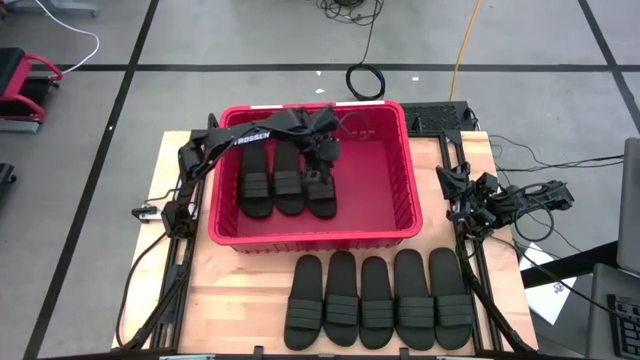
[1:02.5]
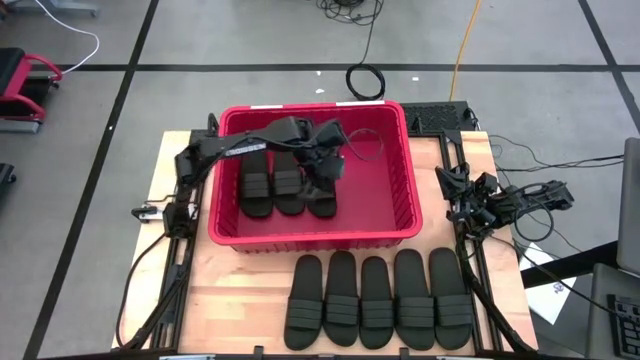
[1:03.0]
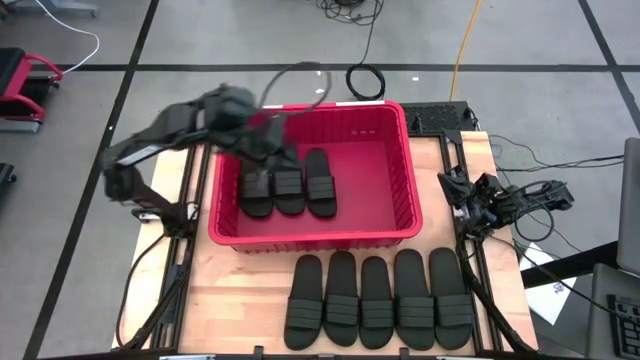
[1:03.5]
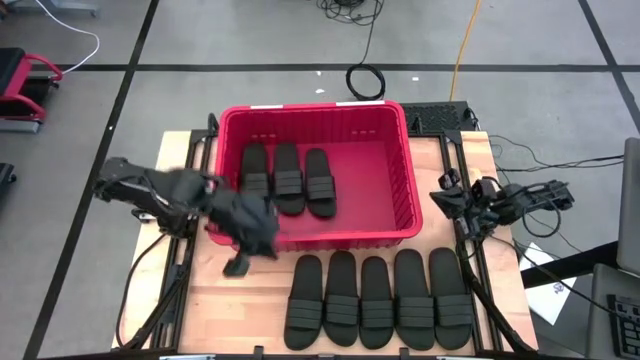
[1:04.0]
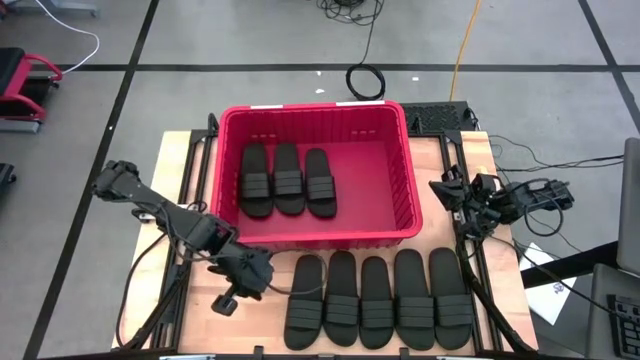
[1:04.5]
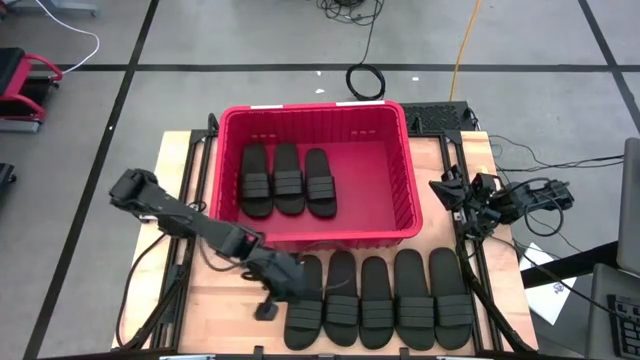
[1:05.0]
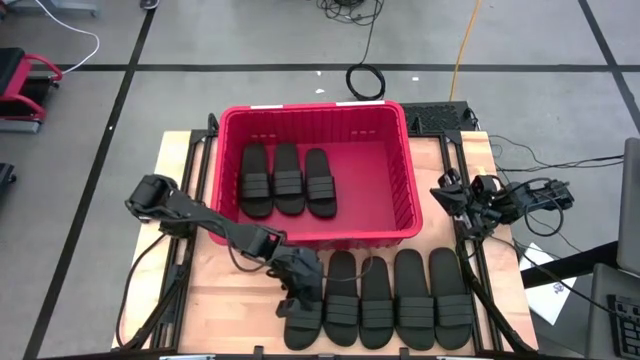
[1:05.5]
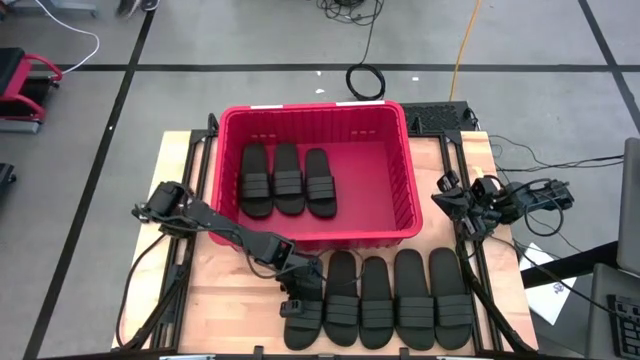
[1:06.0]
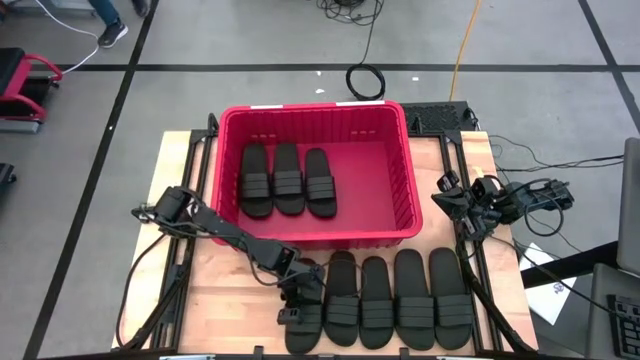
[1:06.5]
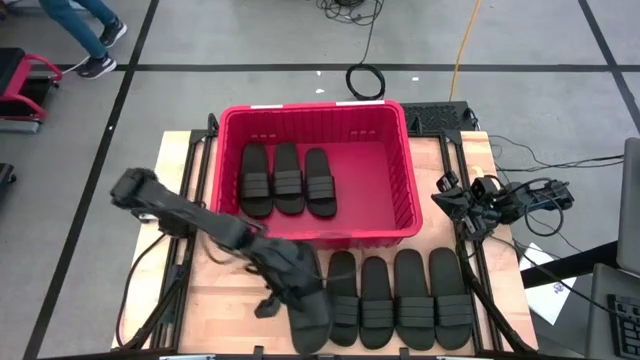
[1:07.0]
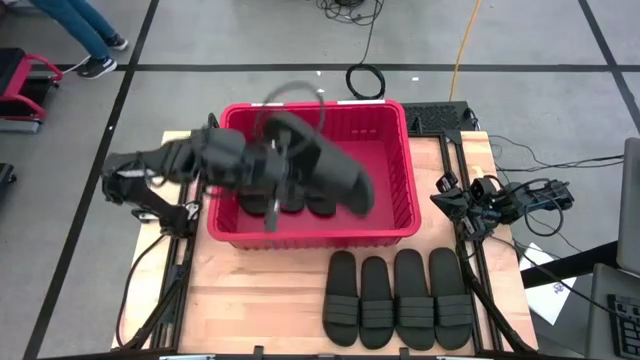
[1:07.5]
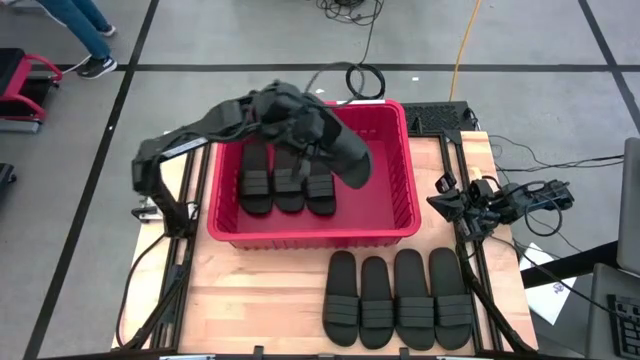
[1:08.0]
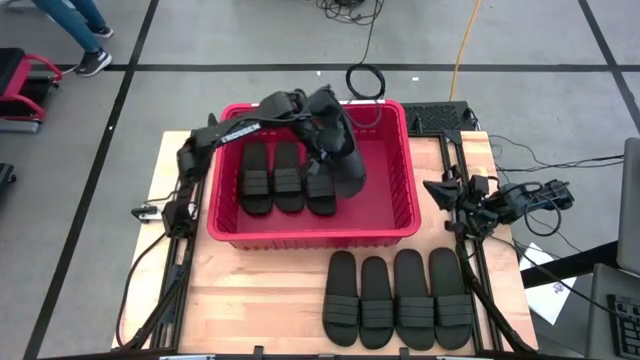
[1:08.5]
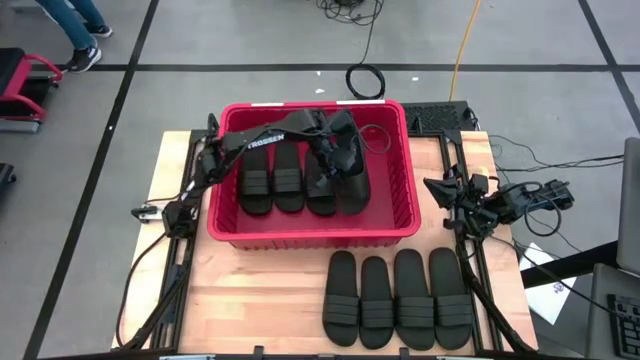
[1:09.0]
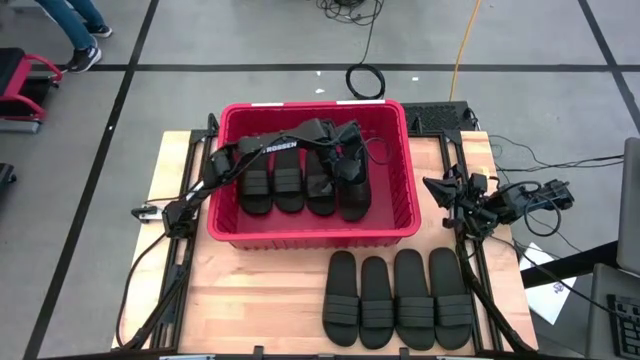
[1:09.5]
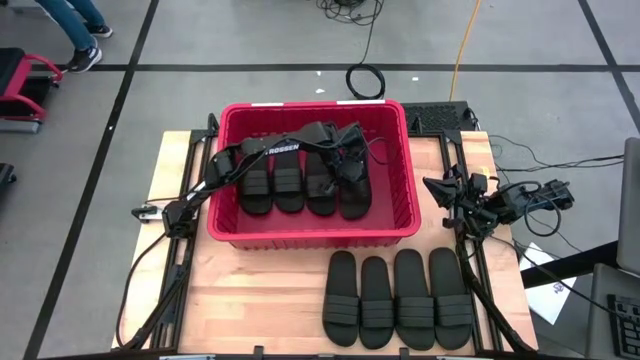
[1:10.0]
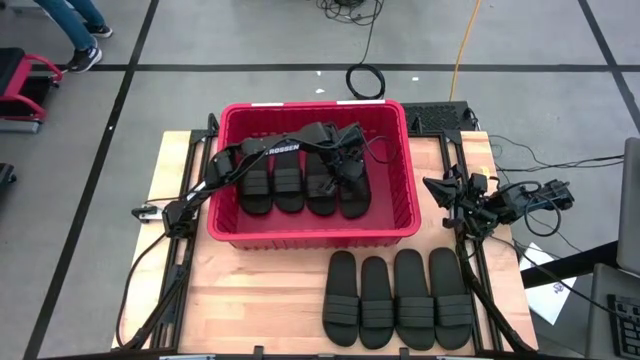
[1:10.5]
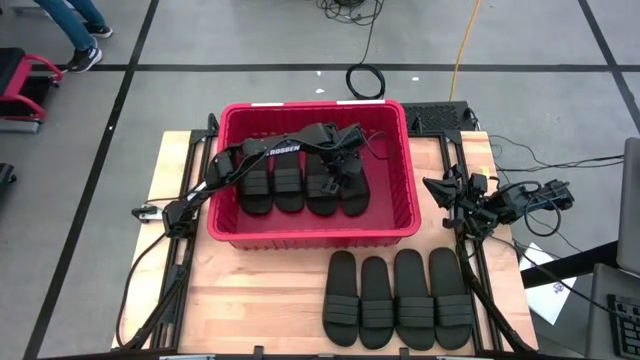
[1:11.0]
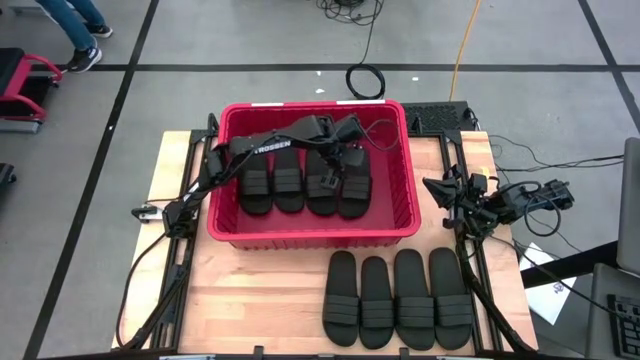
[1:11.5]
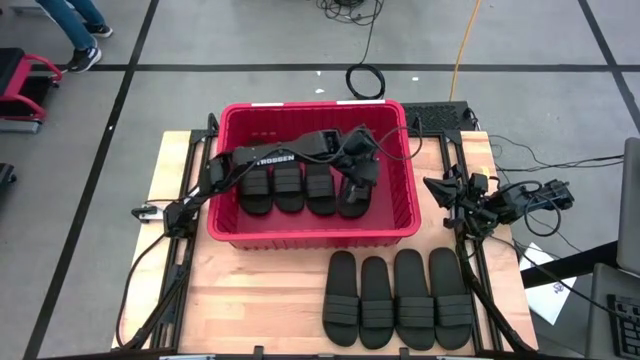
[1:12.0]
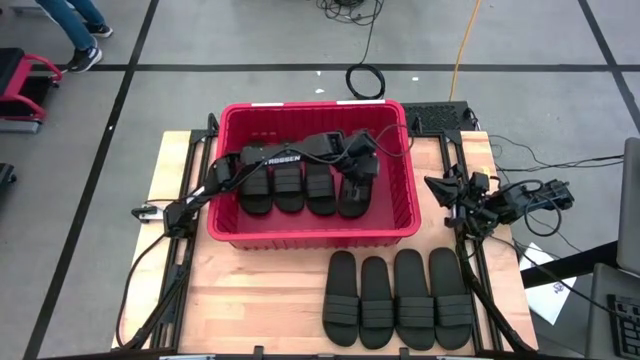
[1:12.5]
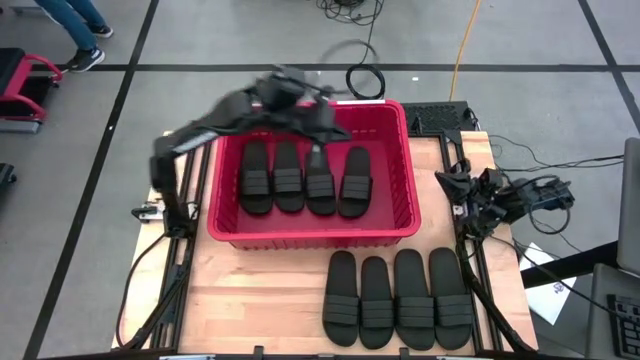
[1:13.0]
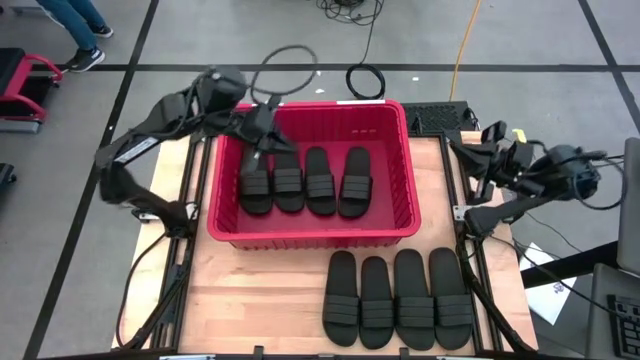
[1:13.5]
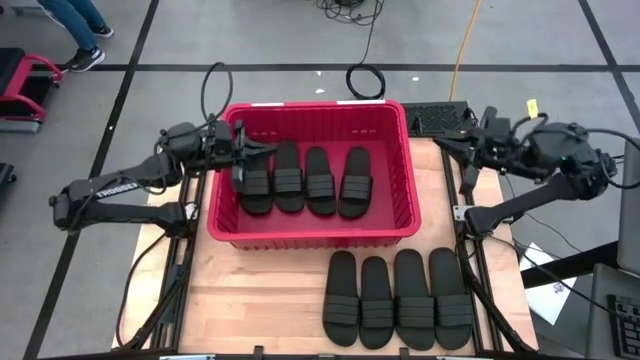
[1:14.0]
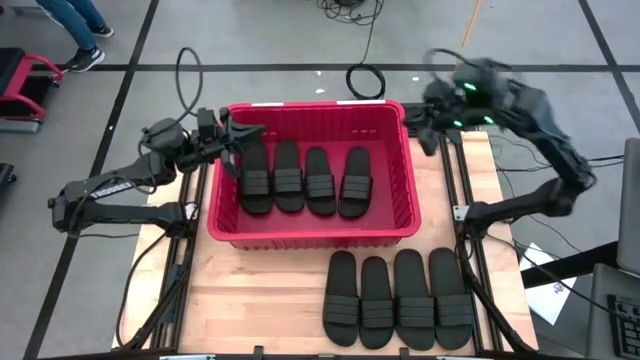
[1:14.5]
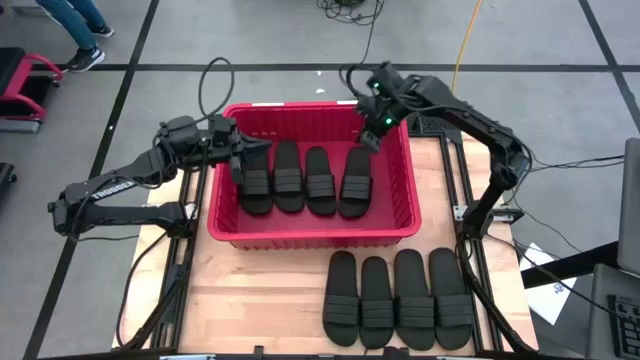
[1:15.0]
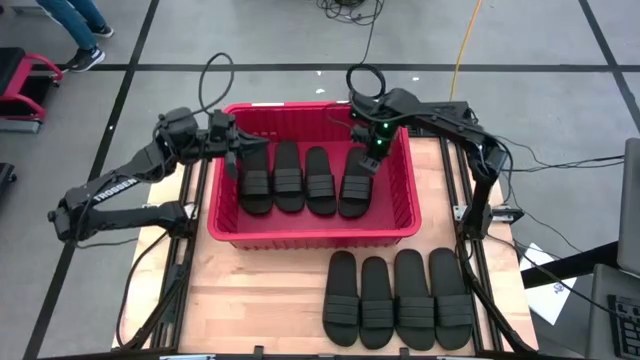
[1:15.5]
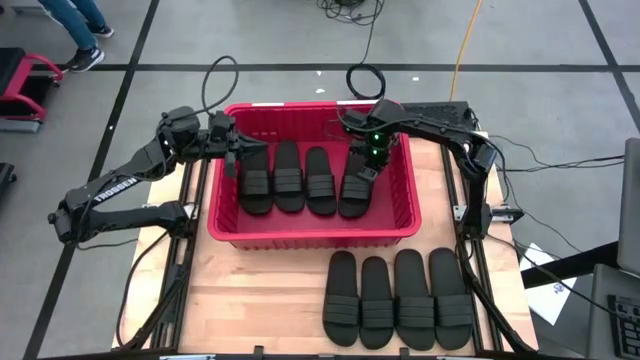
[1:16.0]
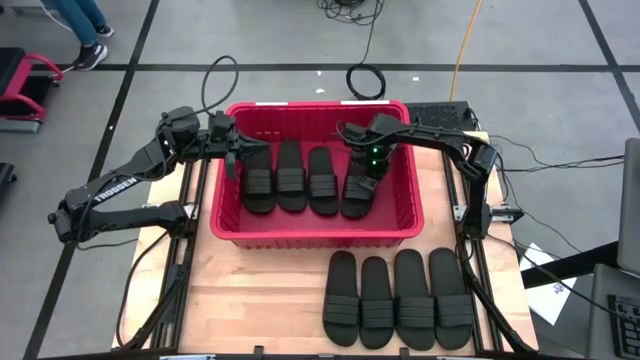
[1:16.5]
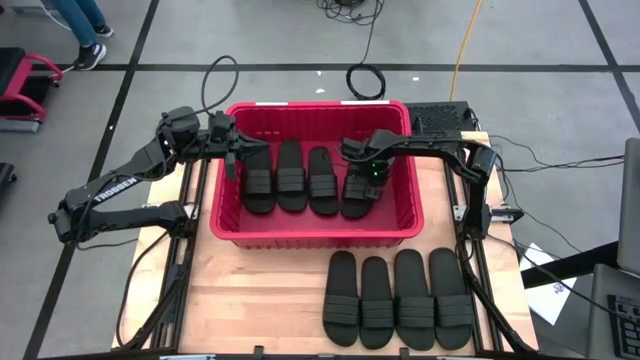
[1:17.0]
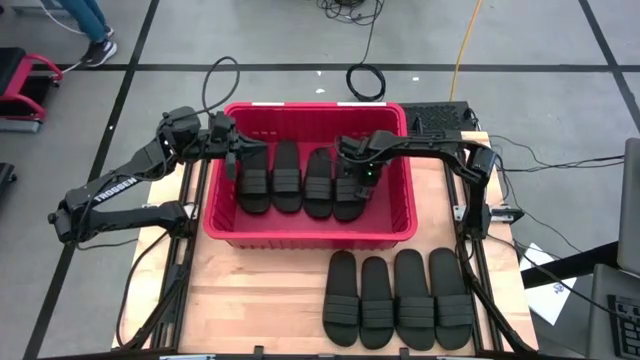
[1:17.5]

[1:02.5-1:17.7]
Task: Pick and place slides into bin
Put the slipper into the bin

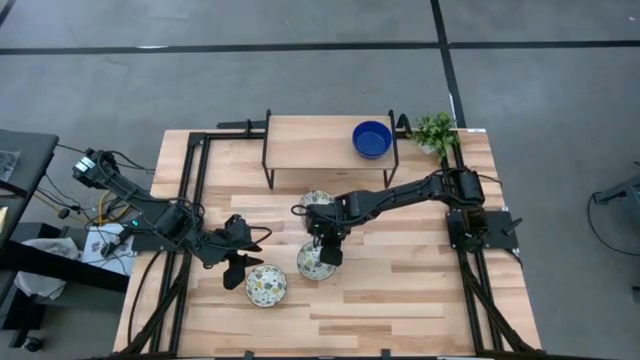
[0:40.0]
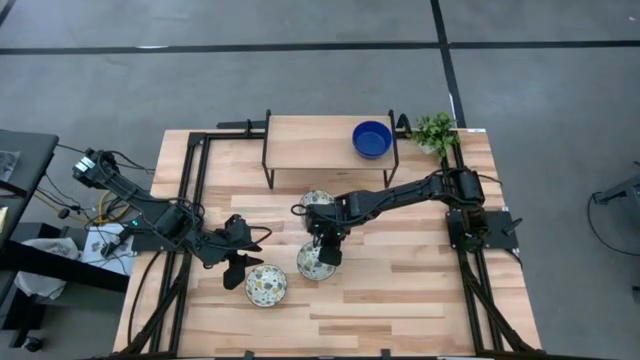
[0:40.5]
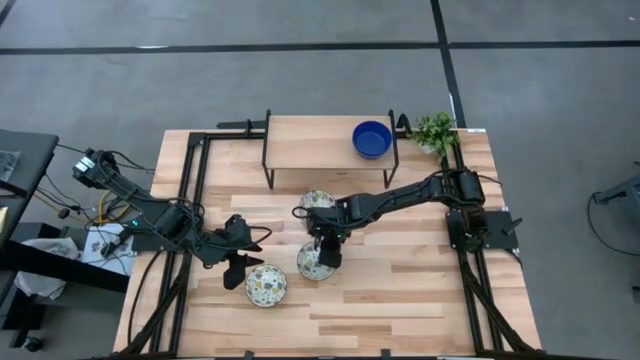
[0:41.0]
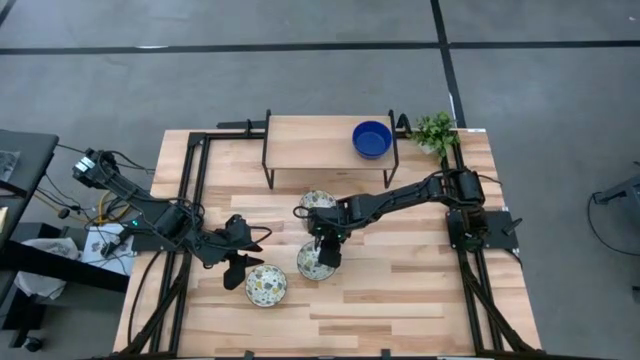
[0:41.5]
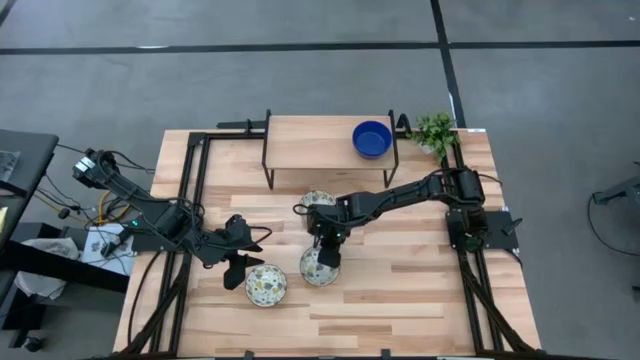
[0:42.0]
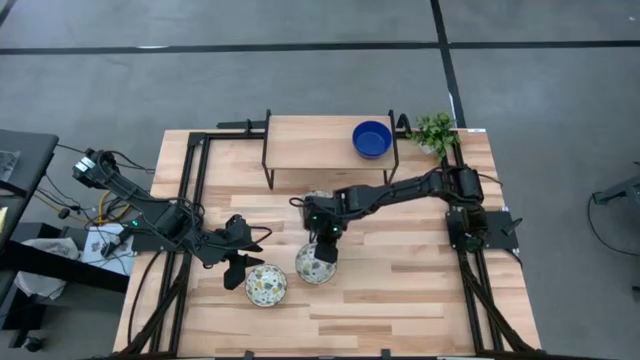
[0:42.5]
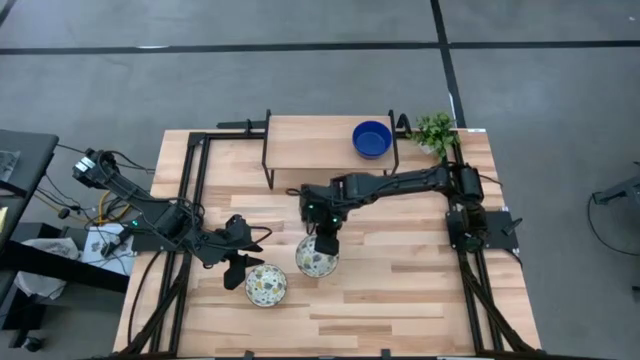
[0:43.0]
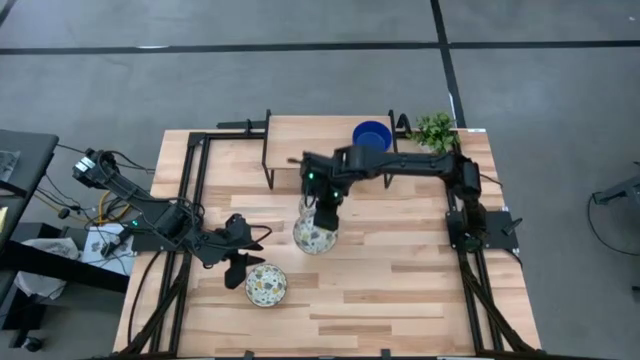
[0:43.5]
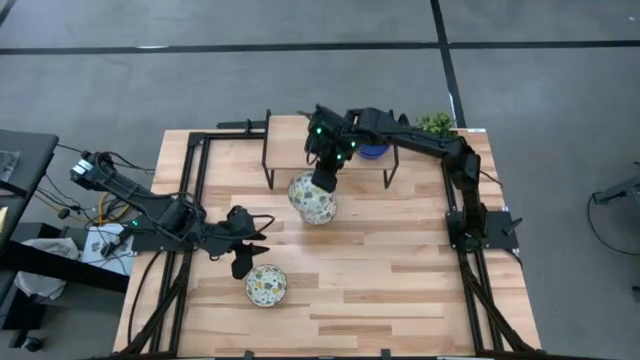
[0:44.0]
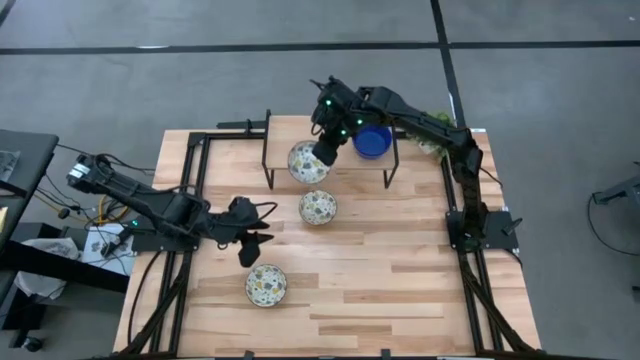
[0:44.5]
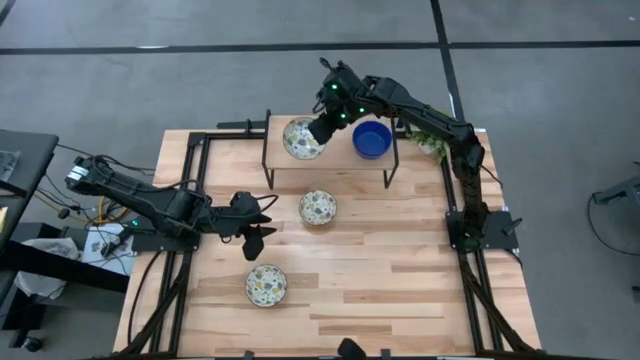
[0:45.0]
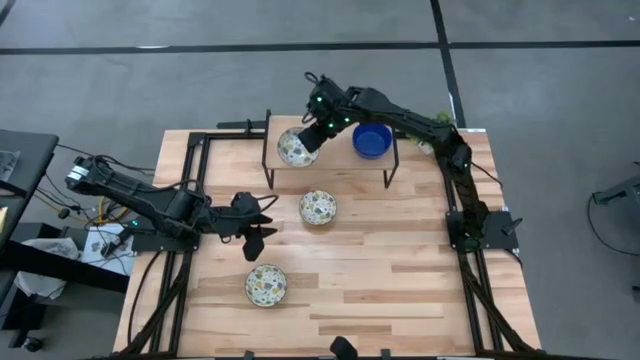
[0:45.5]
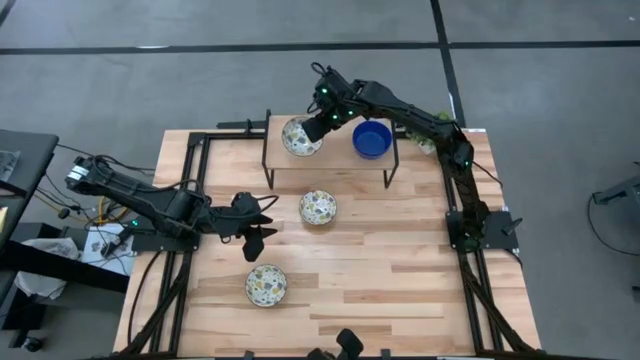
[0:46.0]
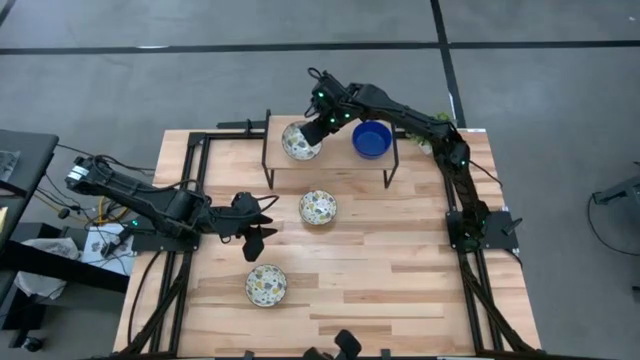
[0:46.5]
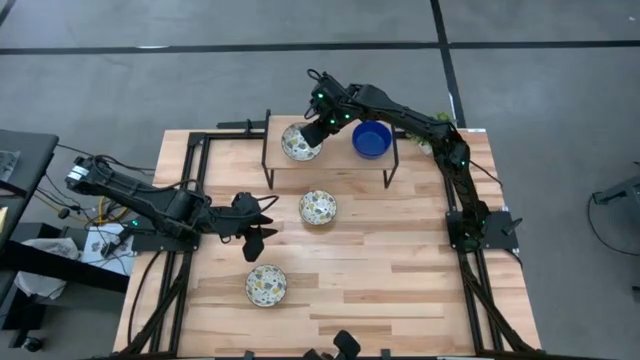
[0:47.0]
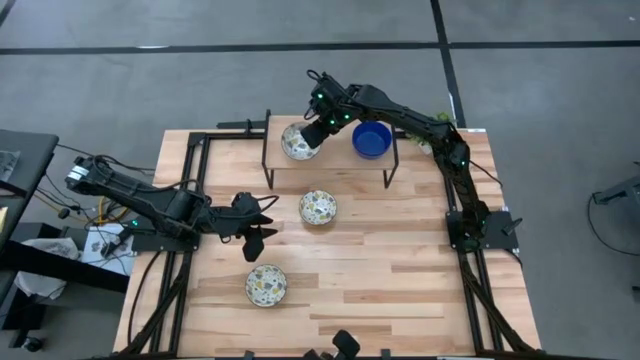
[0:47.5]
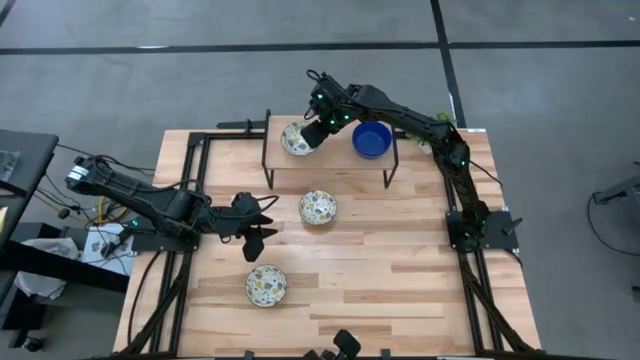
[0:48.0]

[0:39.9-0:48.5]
Task: Pick & Place Mini bowls
Put the middle white patterned bowl on the shelf
